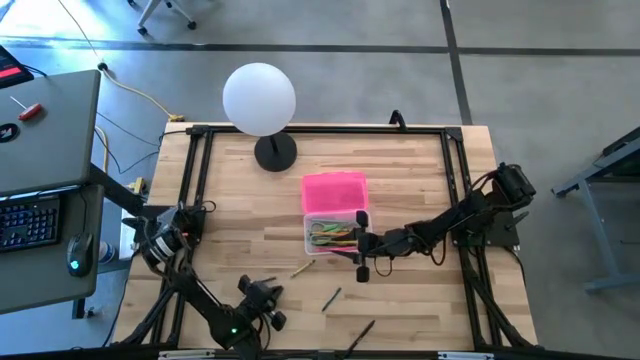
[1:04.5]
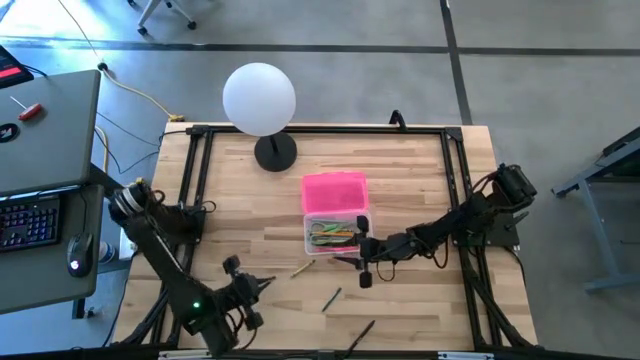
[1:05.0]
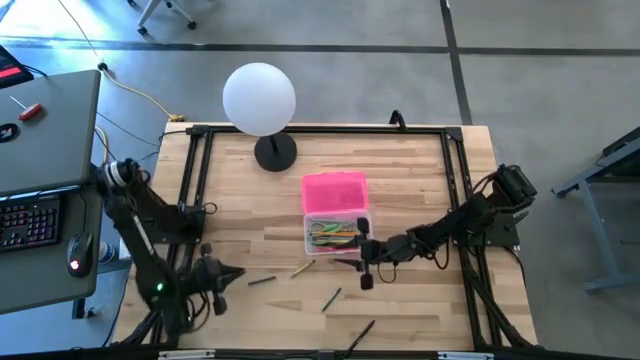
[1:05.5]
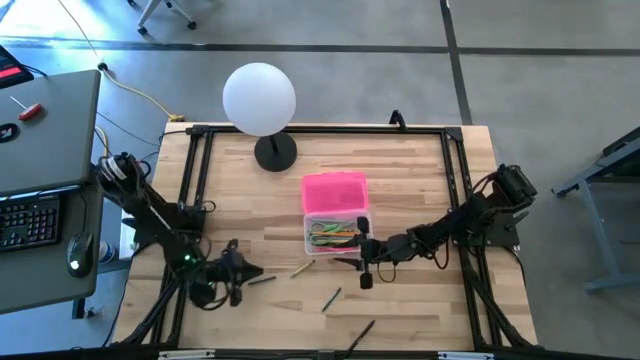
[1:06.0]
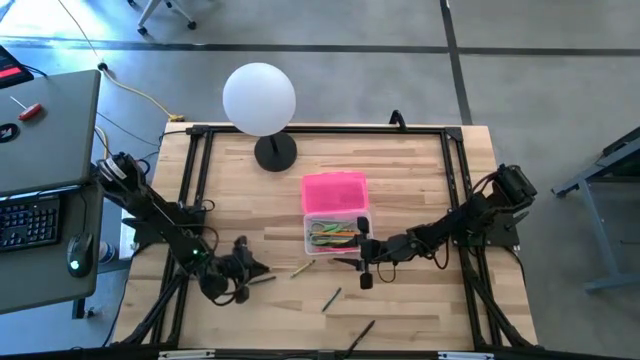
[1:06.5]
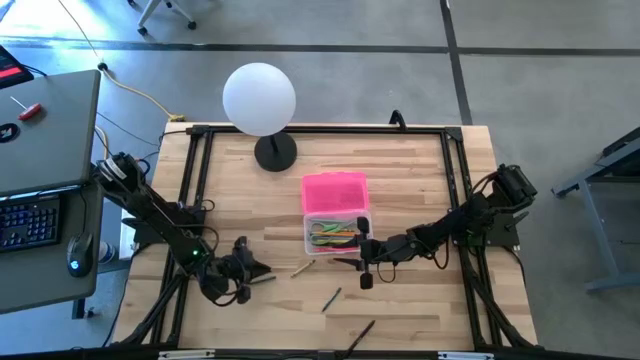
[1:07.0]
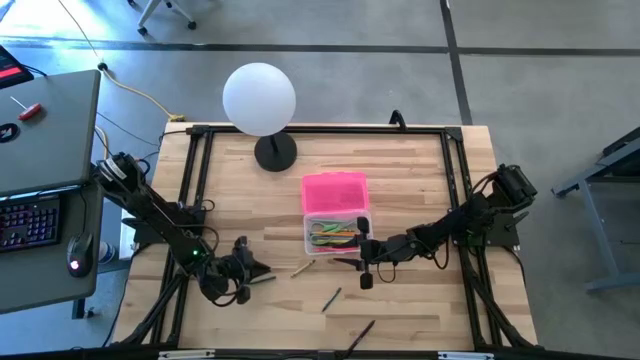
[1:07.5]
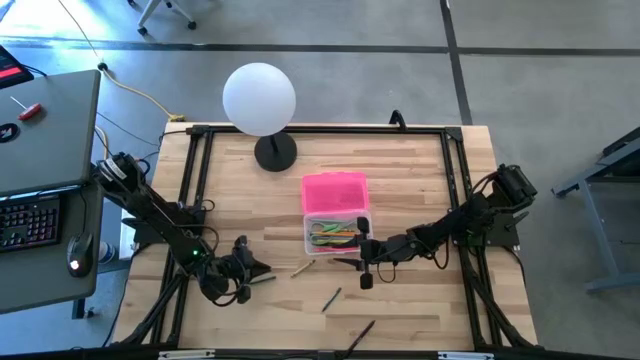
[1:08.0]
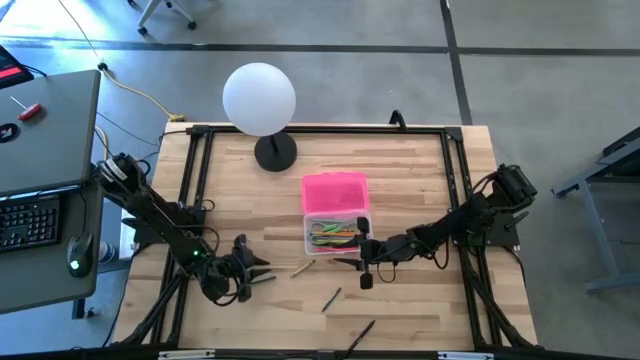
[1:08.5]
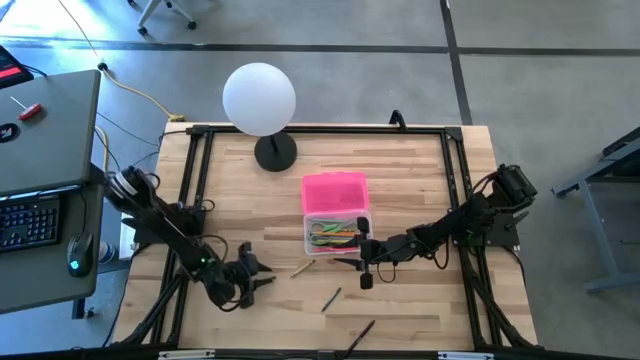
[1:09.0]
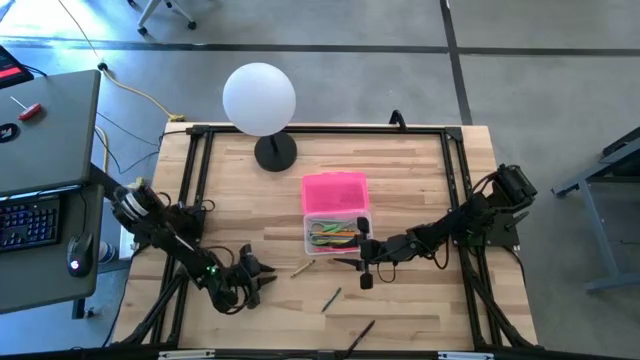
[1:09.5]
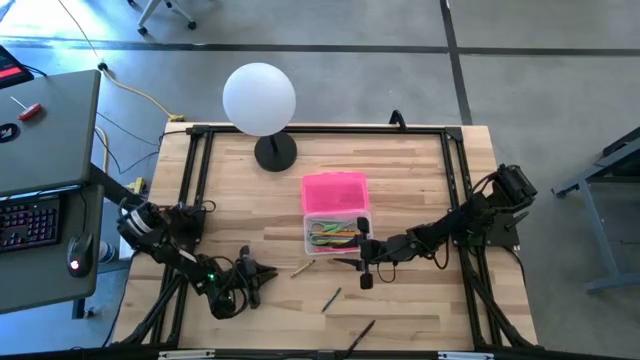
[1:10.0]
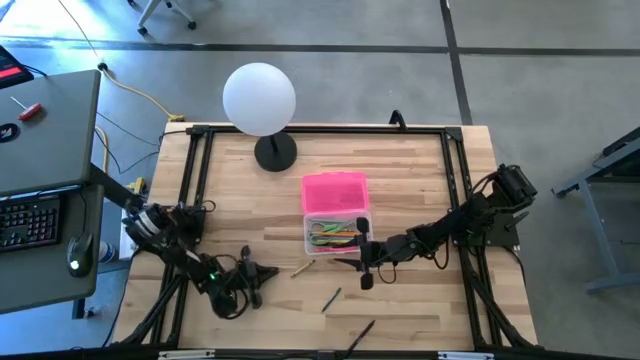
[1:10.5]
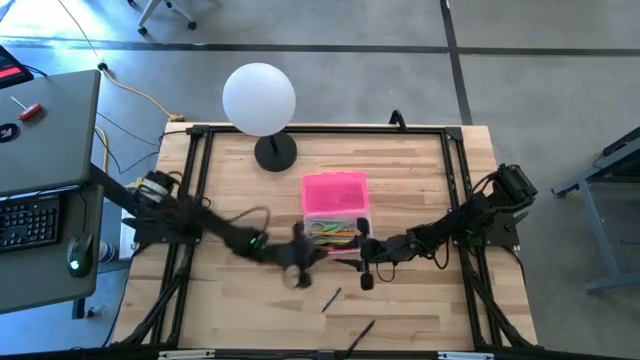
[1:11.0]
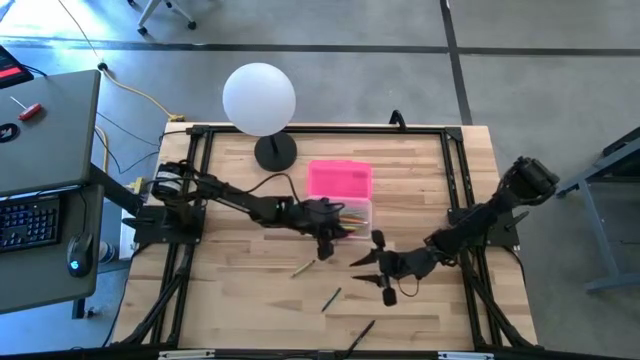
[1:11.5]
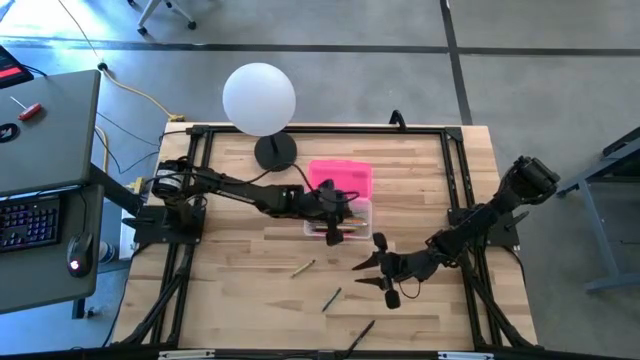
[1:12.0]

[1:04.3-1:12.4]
Task: Pick & place school supplies into a supply box
Put the green crayon into the pink supply box

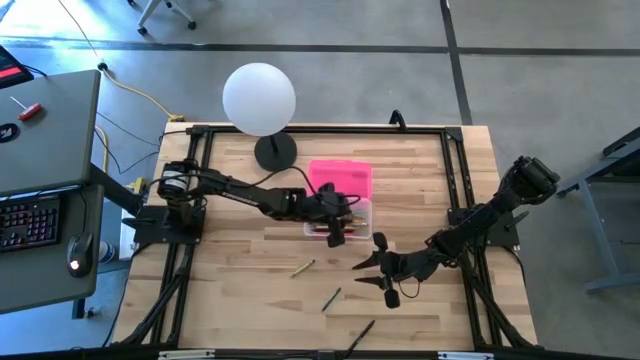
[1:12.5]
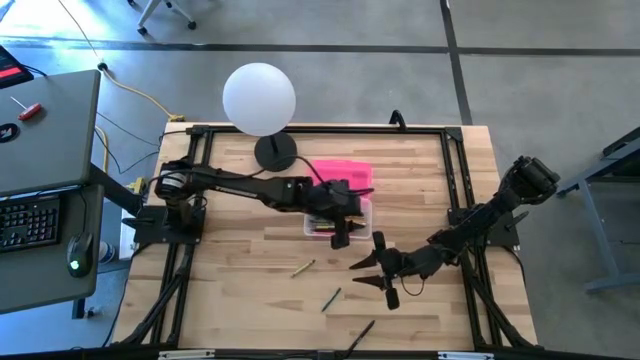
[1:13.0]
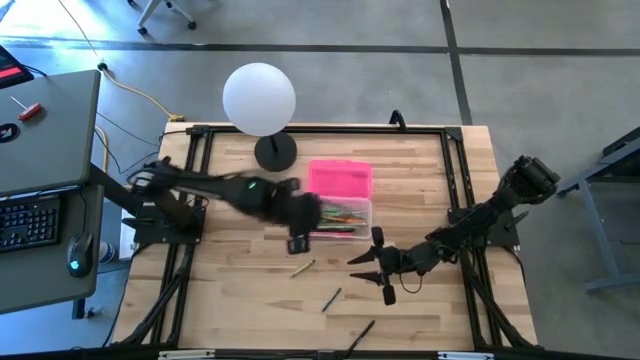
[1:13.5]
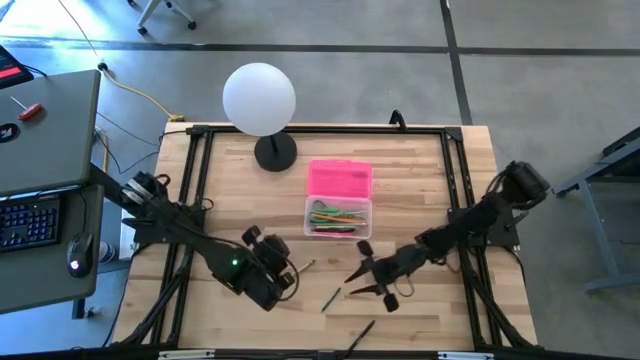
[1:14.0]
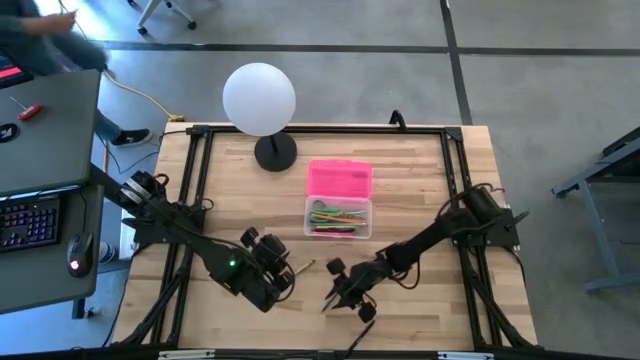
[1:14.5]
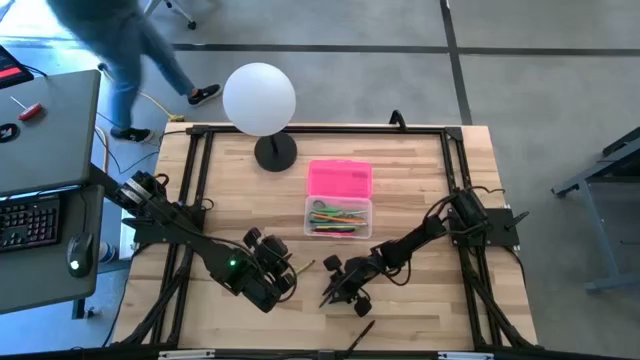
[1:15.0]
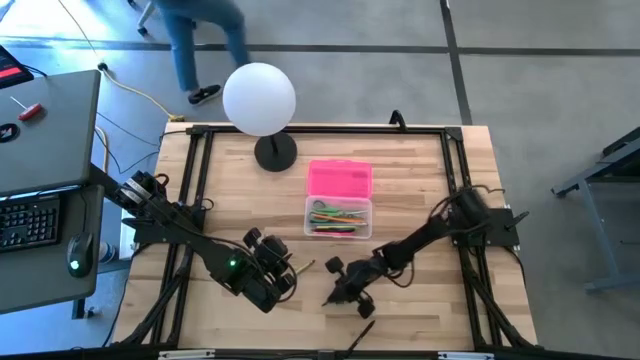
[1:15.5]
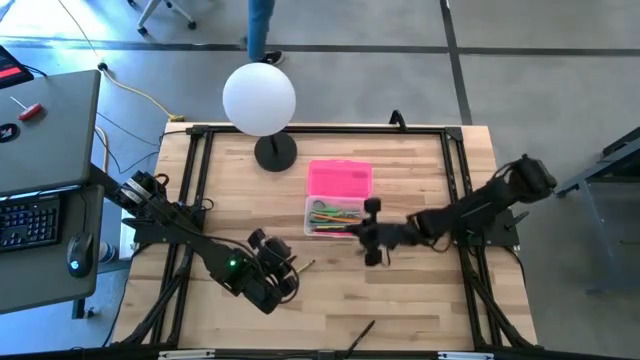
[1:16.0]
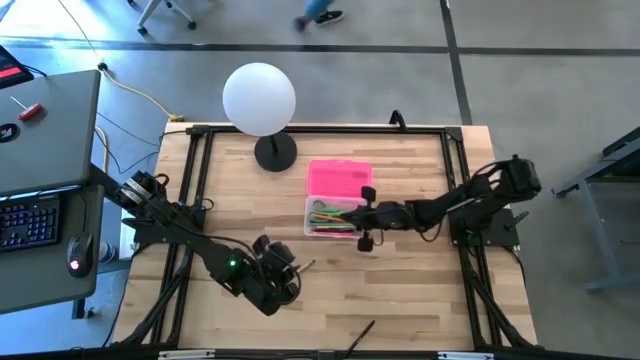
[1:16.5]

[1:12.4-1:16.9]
Put the green crayon into the pink supply box

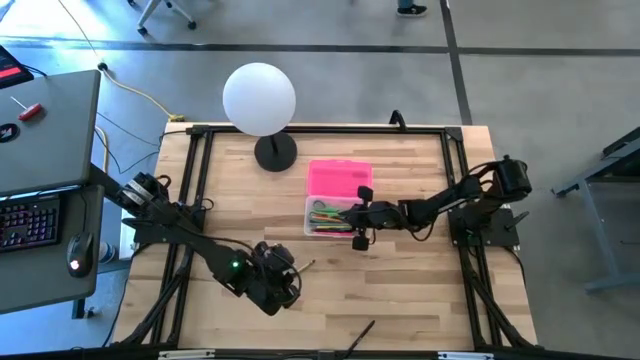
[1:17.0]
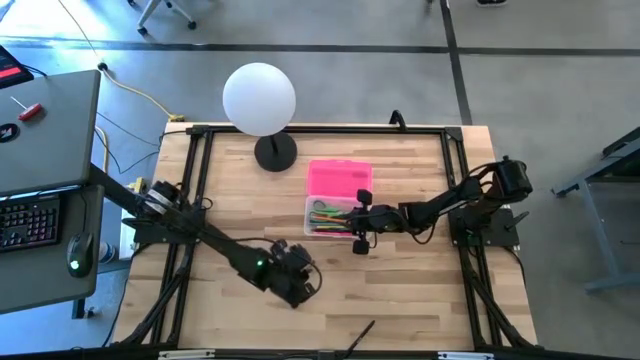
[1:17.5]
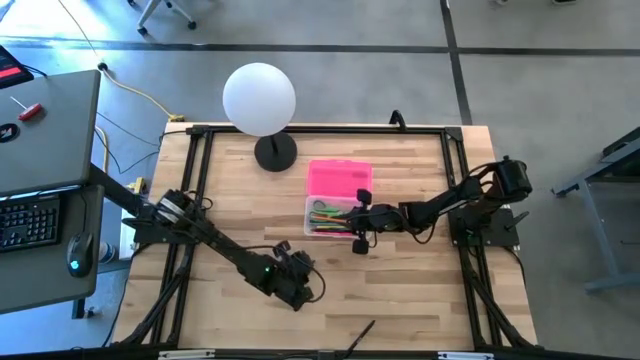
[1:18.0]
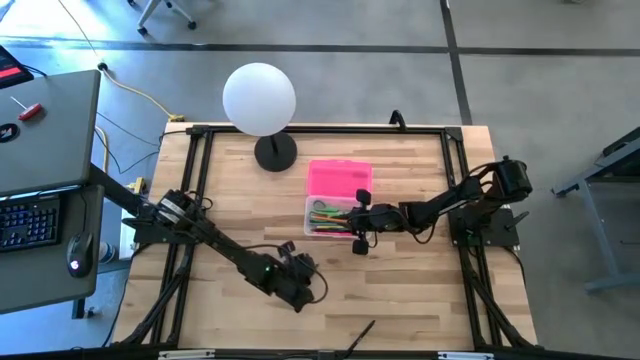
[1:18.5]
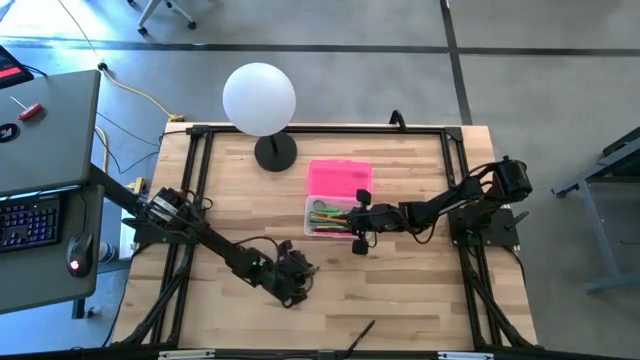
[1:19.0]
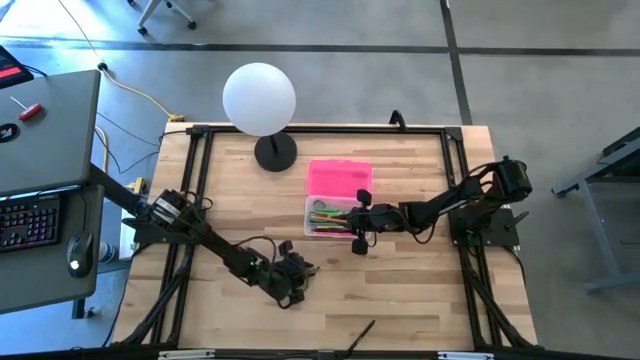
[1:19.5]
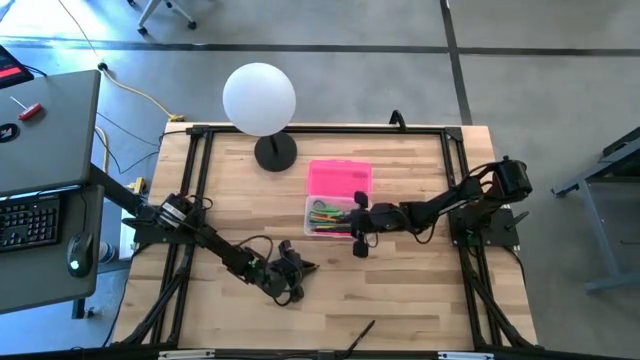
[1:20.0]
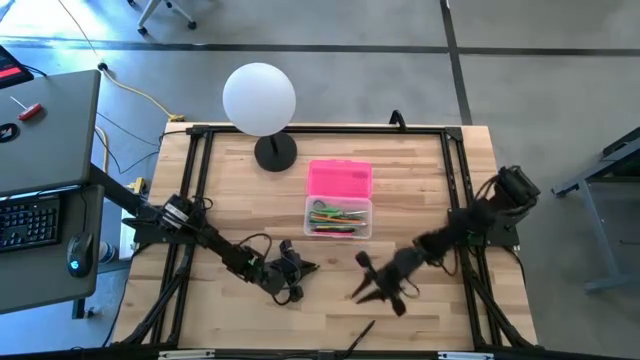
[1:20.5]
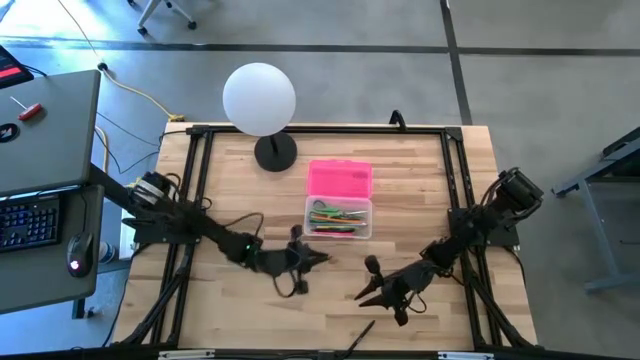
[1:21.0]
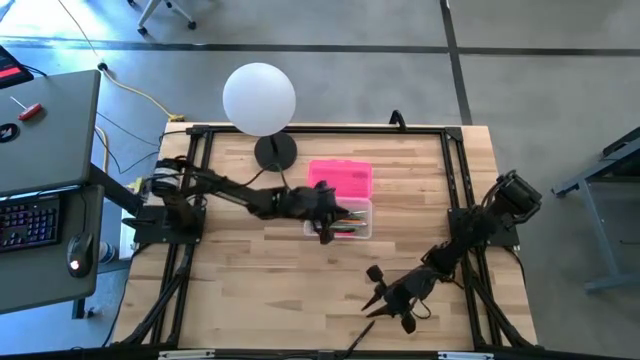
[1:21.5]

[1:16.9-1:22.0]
Put the light green crayon into the pink supply box

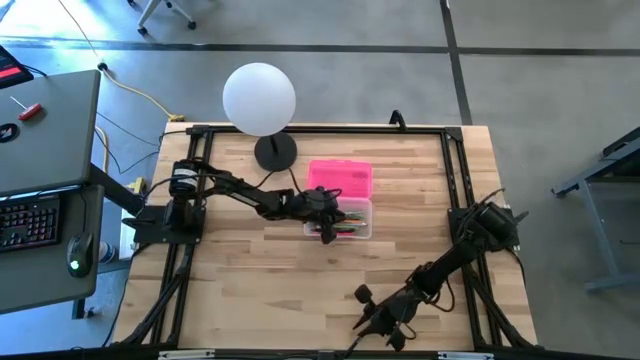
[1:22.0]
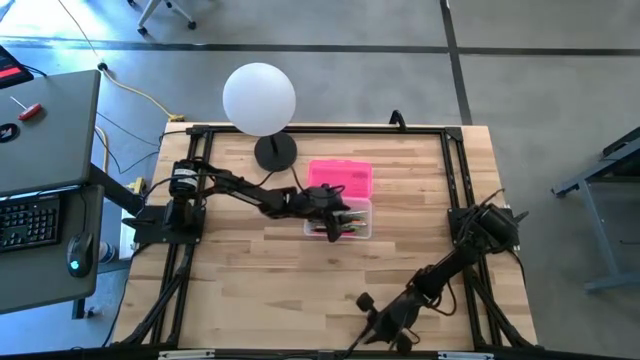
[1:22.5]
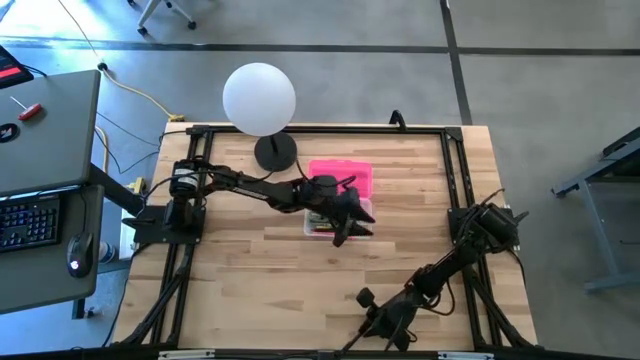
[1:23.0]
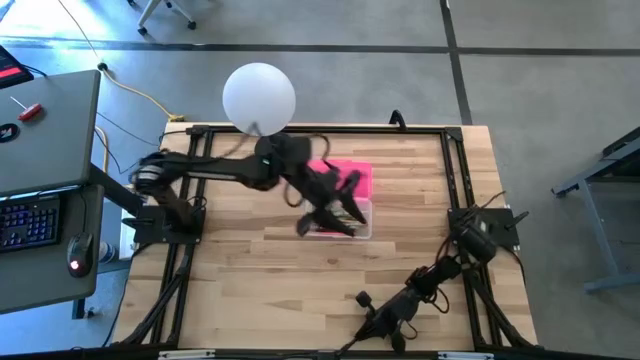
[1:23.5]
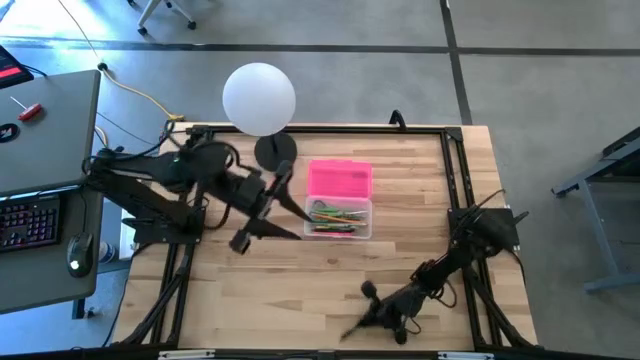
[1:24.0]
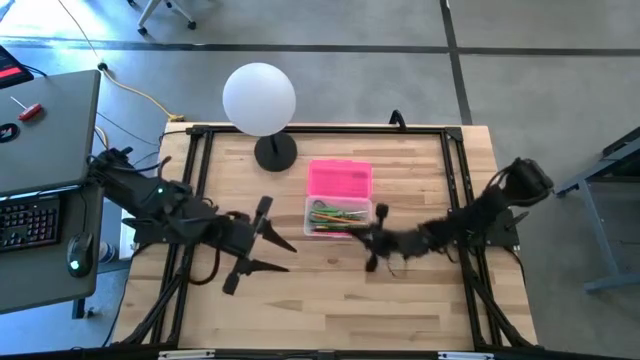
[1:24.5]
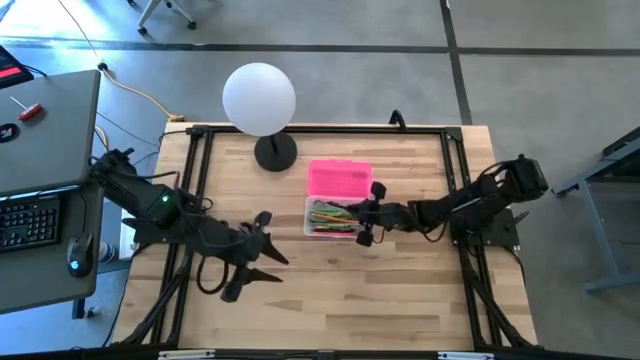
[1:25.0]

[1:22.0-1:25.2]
Put the black pen into the pink supply box

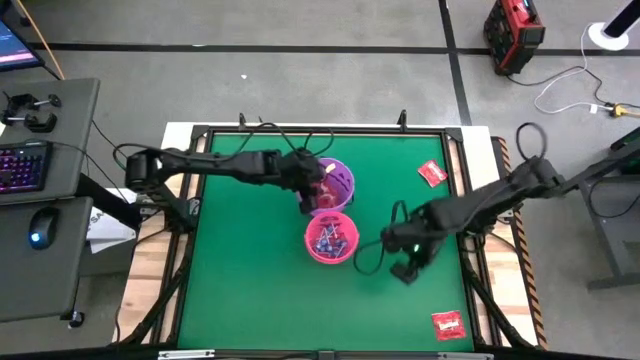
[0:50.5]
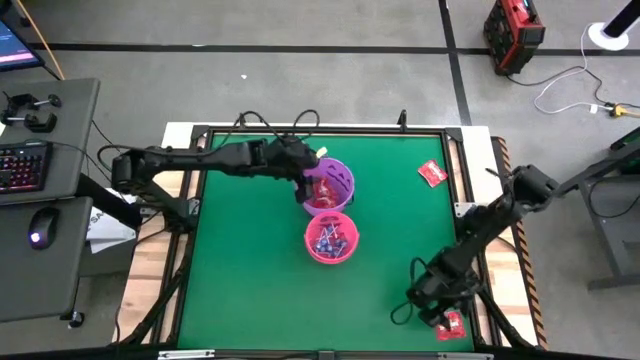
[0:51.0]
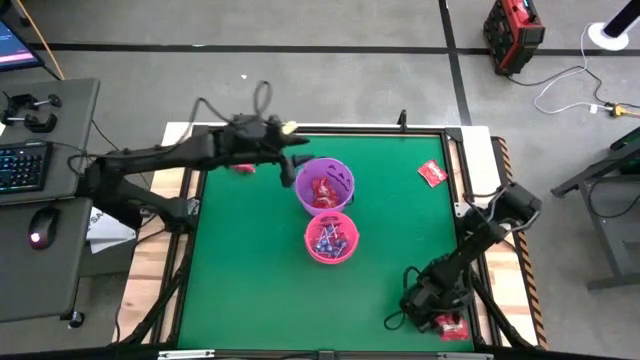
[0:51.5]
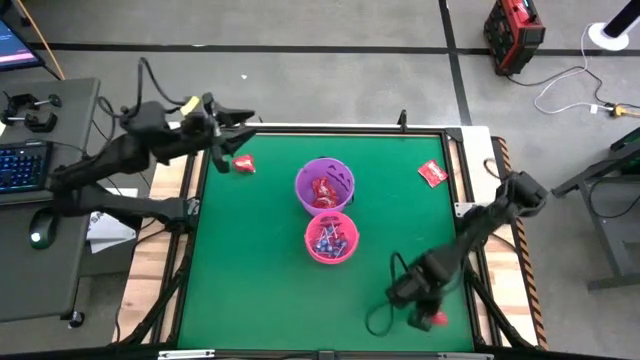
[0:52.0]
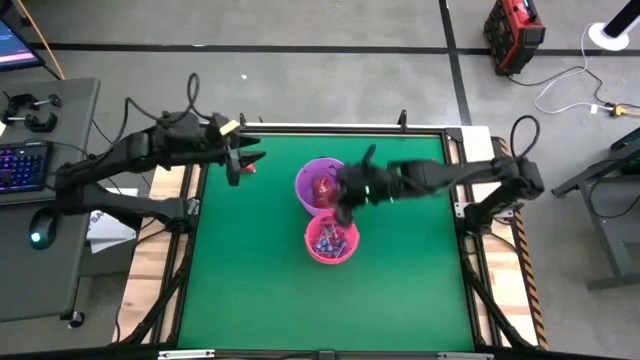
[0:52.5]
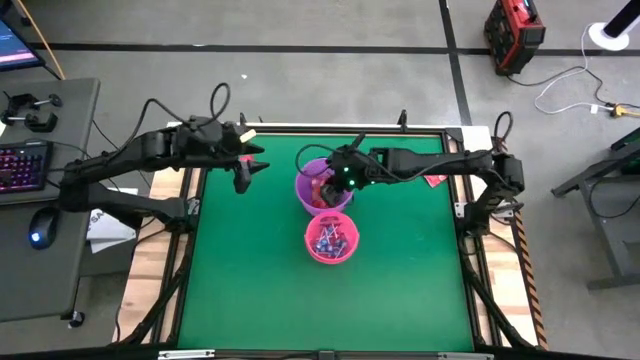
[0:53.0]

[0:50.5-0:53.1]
Task: Sort candy by brand, put in halloween buckets
Put the red candy into the purple bucket
